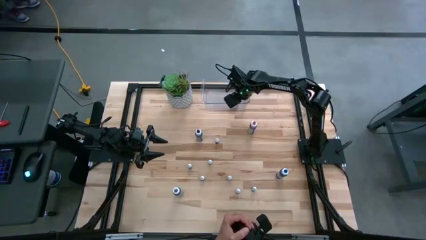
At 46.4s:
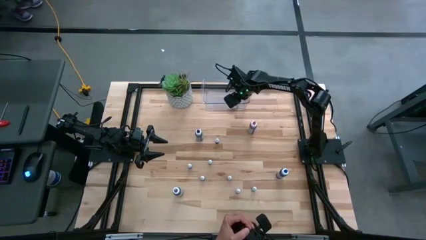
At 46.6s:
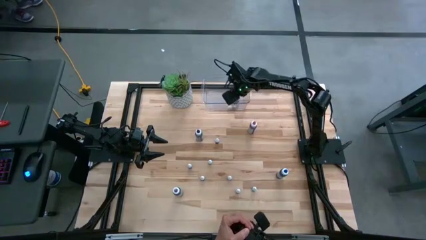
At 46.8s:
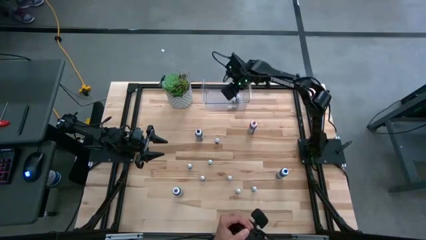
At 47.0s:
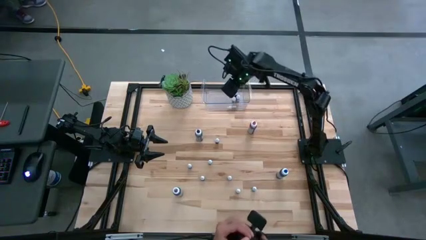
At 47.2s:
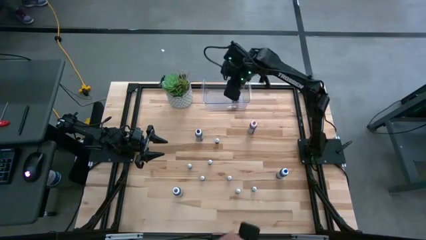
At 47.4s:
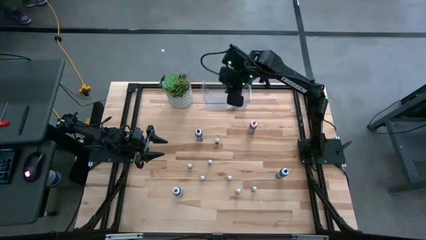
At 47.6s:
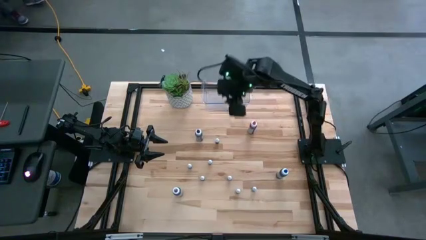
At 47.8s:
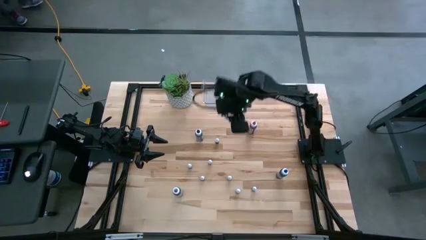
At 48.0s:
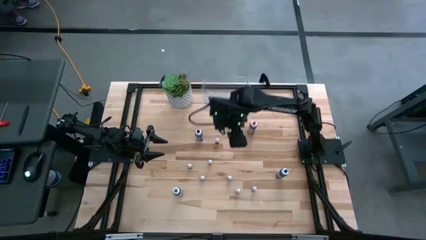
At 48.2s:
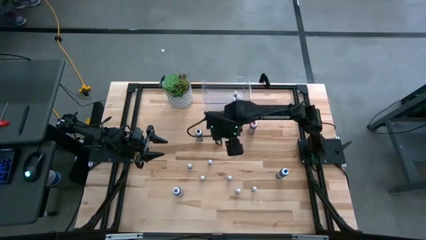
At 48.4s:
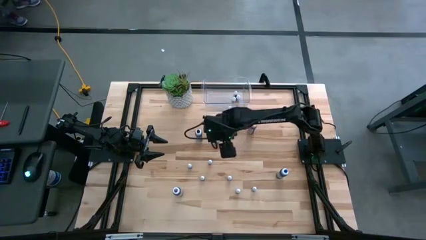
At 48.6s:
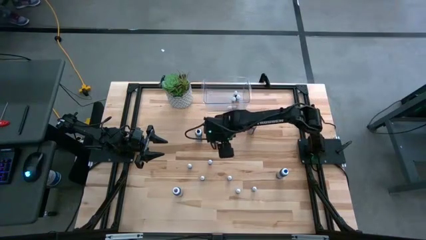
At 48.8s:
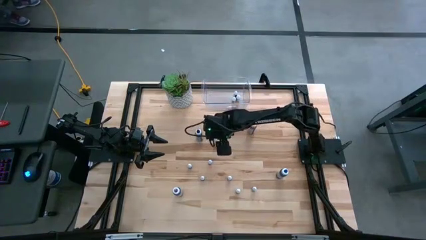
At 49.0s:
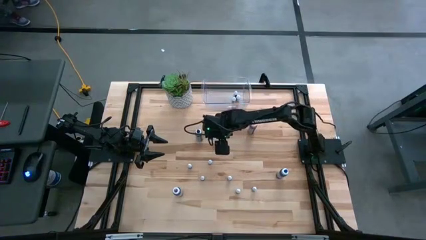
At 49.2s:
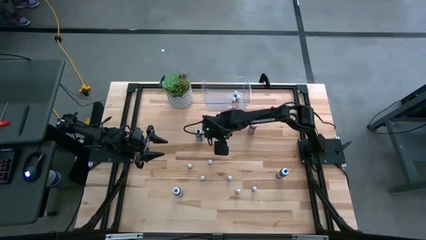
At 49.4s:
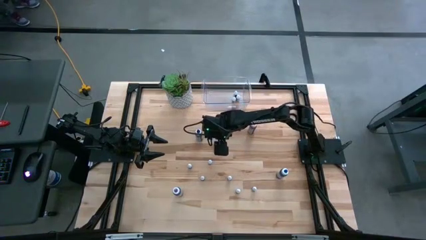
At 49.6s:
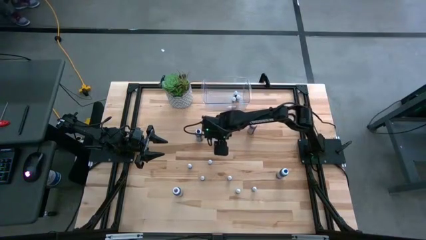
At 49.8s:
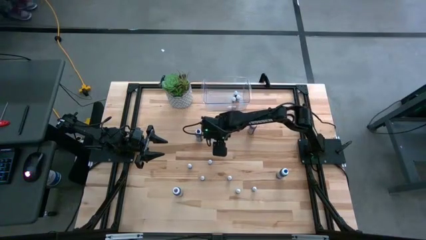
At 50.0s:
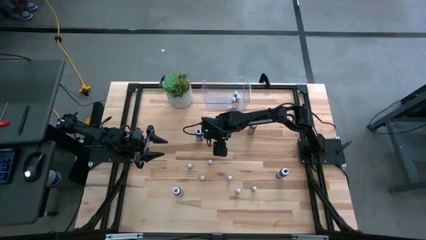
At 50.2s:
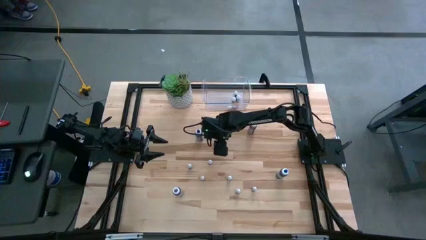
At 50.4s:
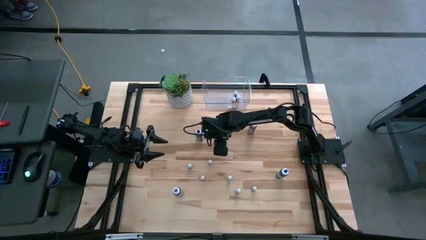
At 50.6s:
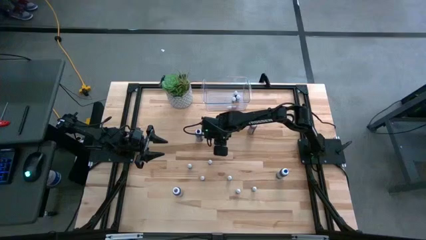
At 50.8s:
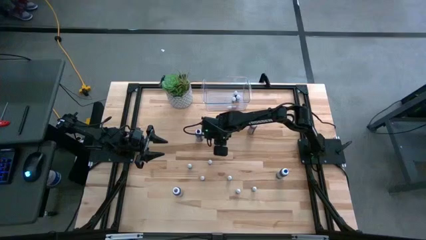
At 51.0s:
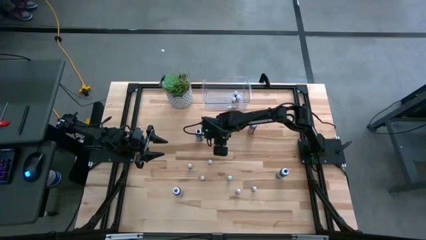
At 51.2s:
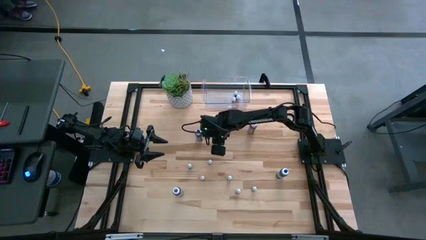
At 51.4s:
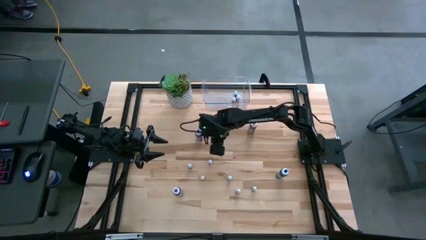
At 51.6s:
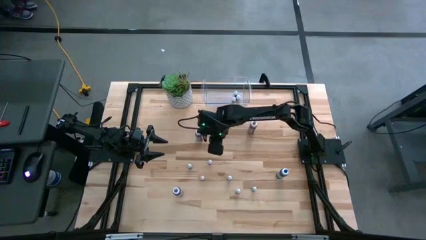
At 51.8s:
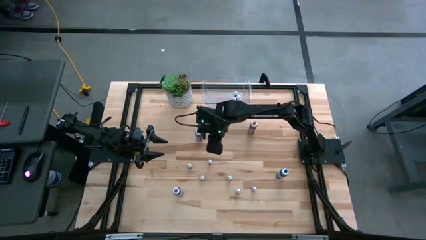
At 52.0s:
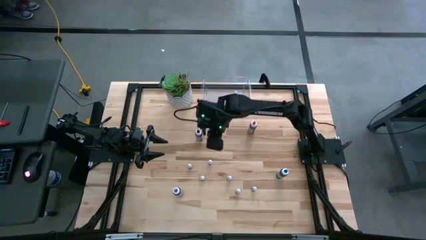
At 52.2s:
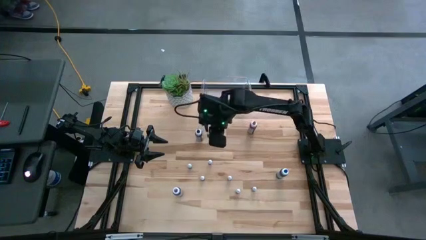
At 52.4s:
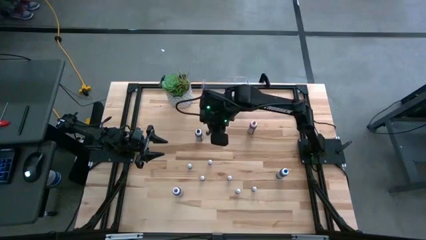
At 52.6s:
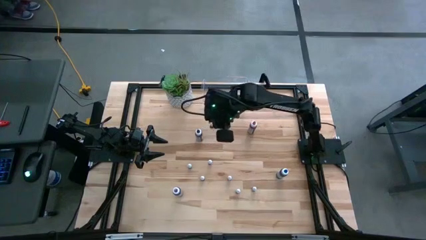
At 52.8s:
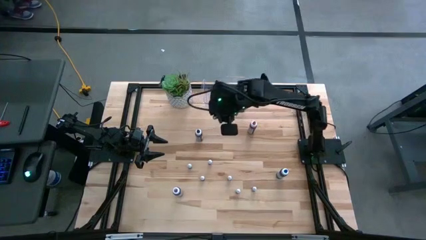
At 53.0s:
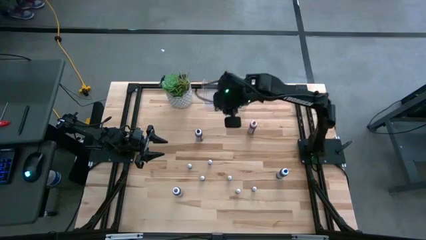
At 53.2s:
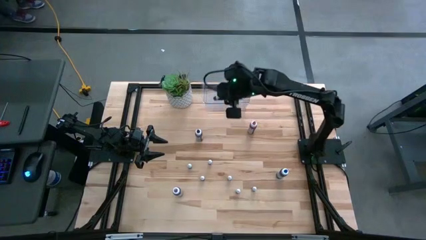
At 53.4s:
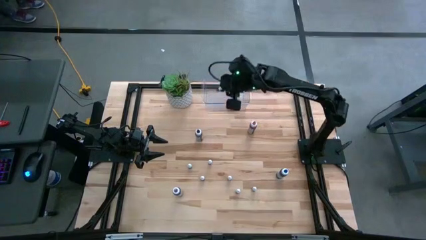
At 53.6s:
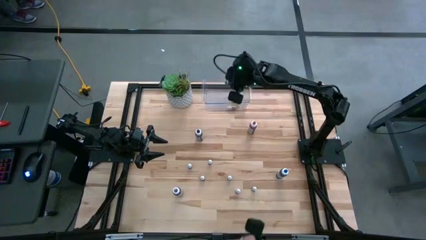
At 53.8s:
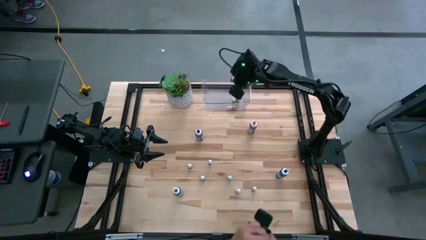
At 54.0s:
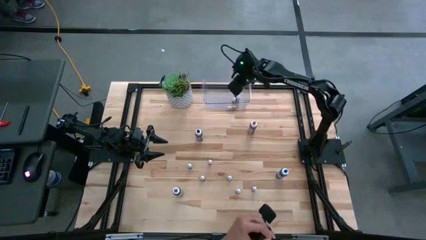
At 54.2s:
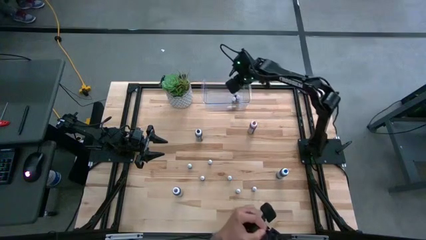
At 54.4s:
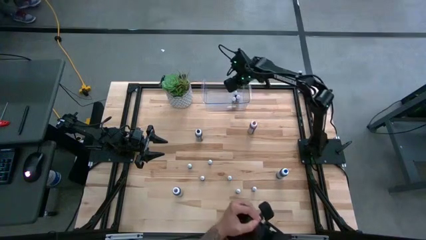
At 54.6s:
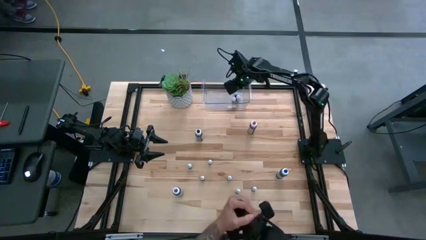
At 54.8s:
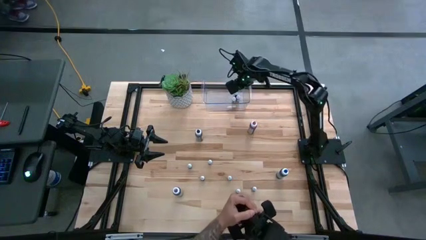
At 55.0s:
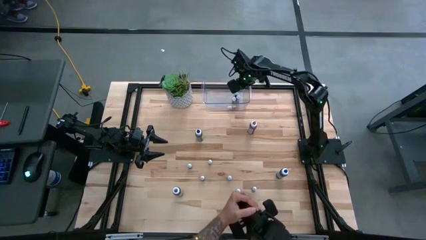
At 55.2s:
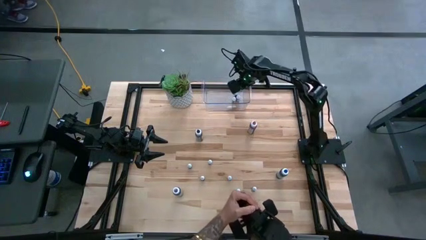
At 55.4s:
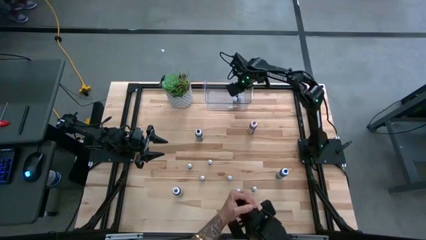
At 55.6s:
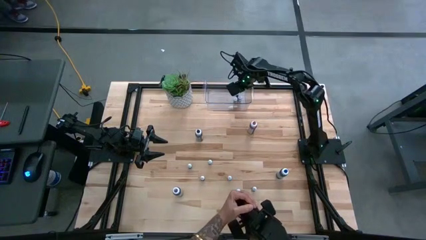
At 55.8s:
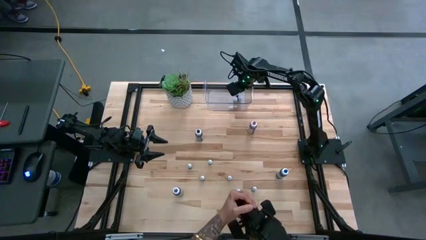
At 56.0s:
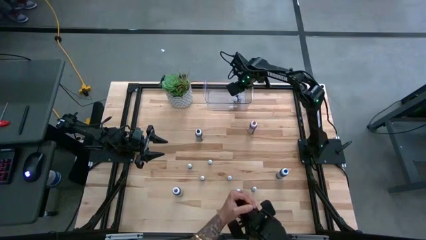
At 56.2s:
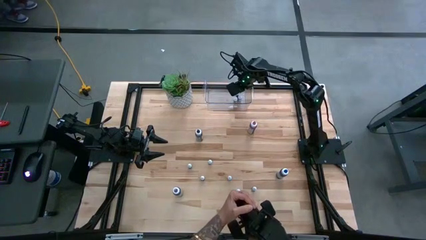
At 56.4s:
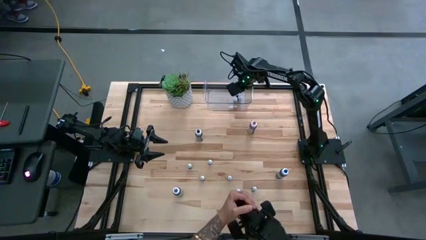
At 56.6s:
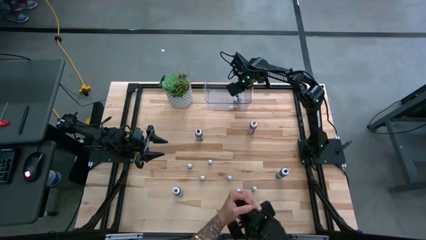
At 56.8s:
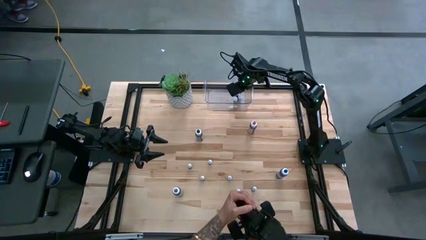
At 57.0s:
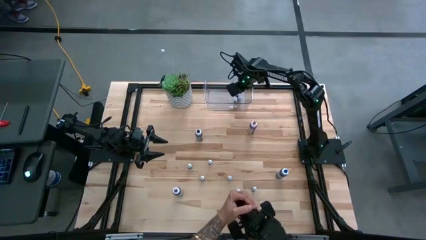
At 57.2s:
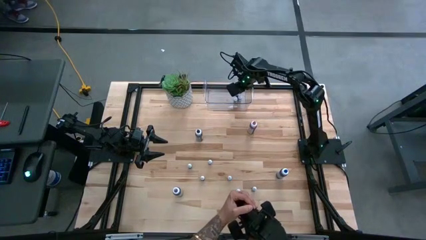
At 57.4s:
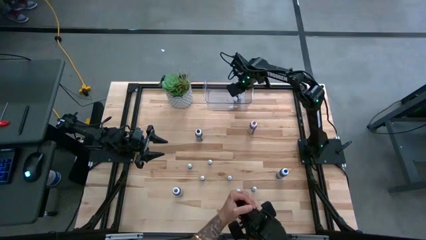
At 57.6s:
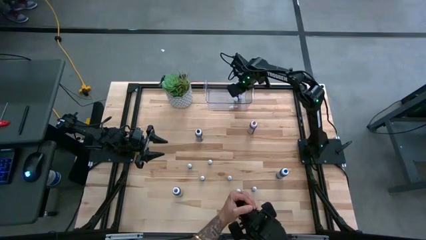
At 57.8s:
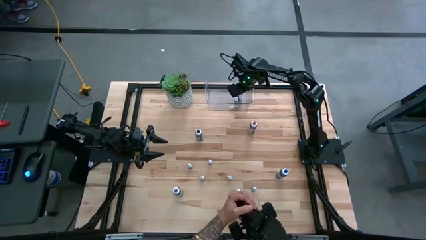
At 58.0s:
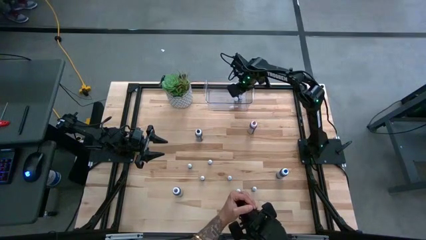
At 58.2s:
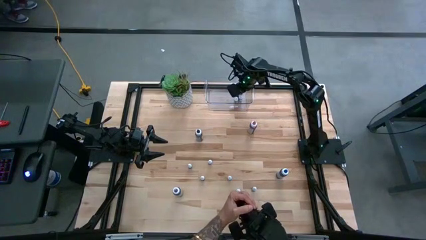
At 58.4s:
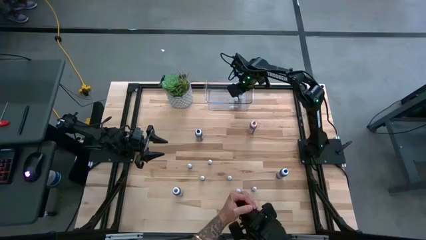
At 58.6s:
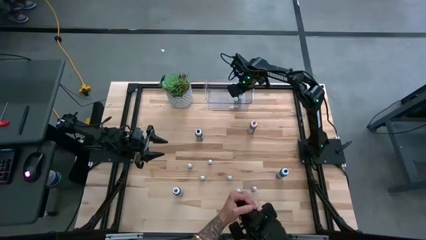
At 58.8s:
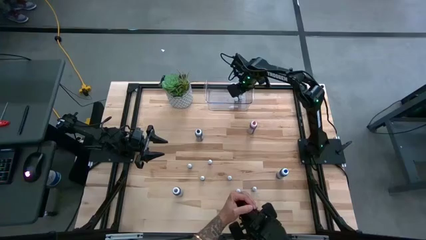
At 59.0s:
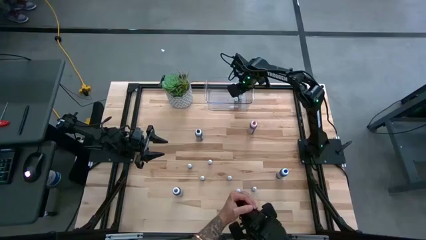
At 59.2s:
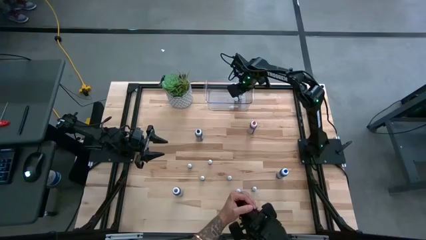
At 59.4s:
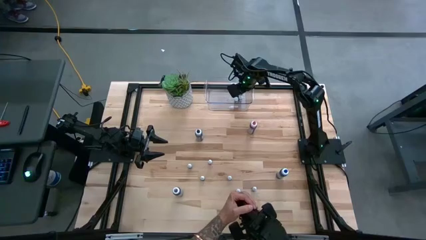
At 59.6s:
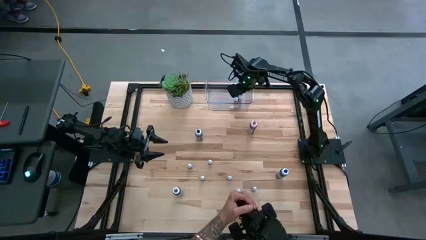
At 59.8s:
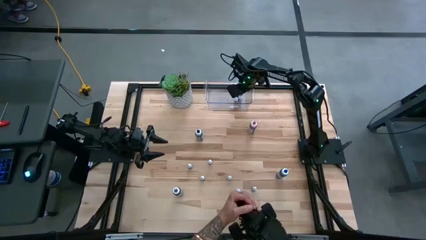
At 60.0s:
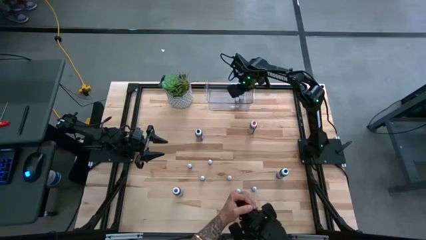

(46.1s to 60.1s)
Task: Pick & Place food coloring
Put the top small green red food coloring bottle into the bin
